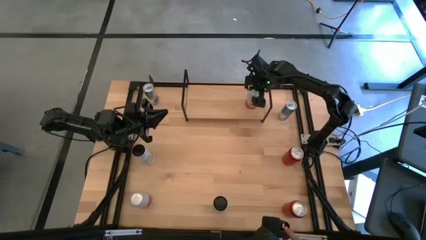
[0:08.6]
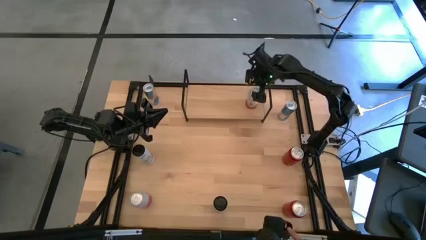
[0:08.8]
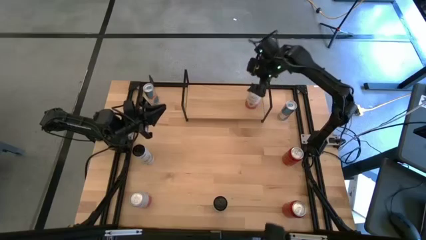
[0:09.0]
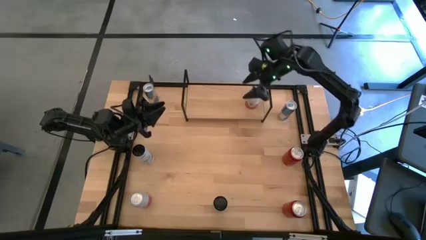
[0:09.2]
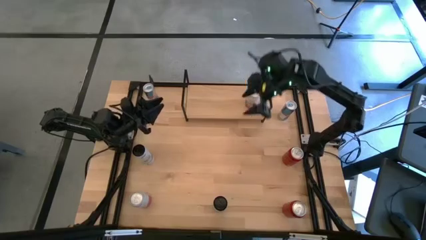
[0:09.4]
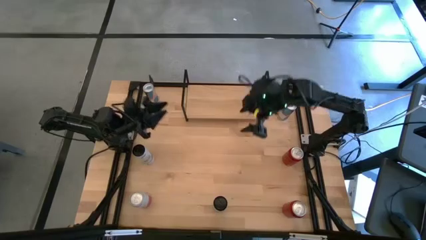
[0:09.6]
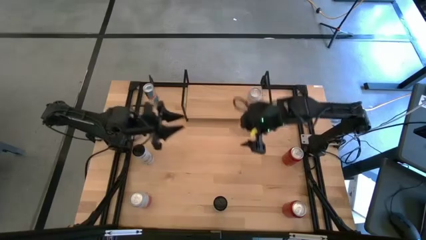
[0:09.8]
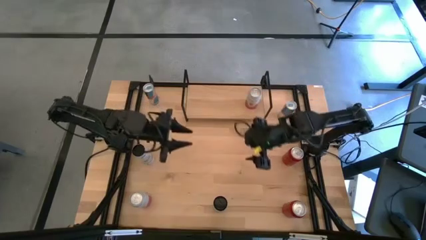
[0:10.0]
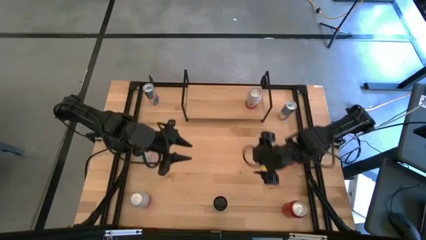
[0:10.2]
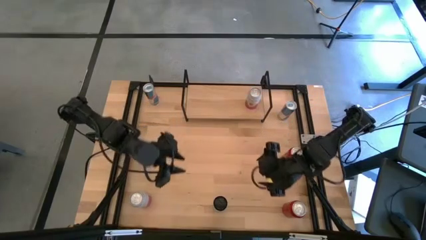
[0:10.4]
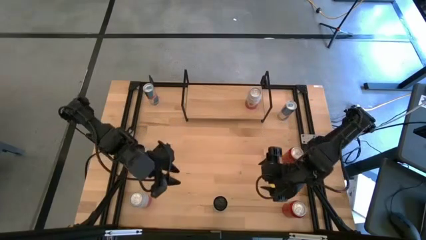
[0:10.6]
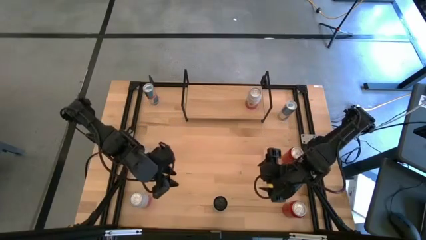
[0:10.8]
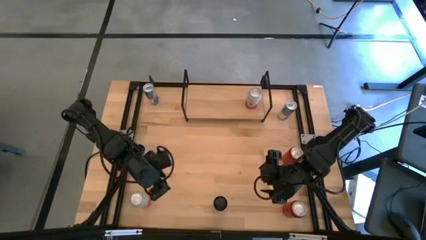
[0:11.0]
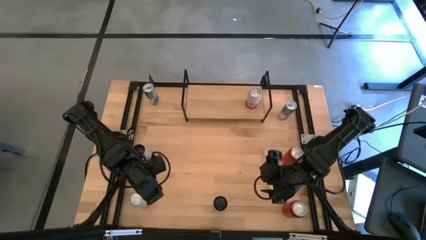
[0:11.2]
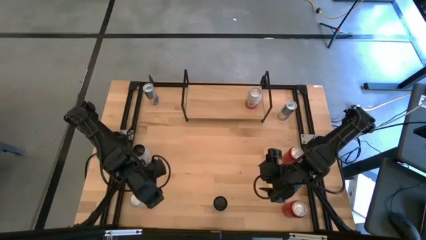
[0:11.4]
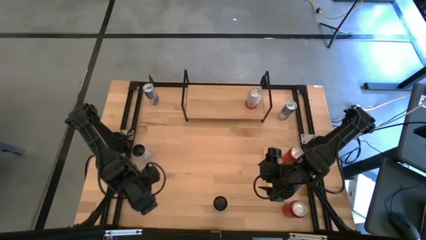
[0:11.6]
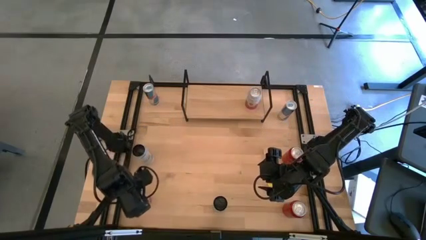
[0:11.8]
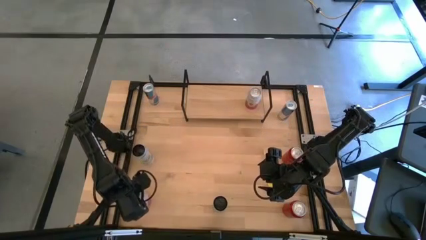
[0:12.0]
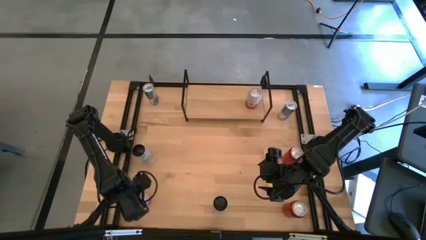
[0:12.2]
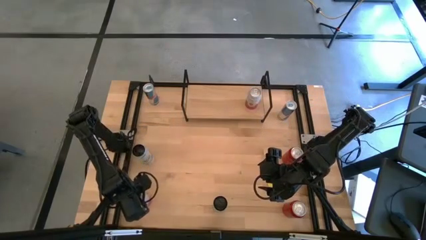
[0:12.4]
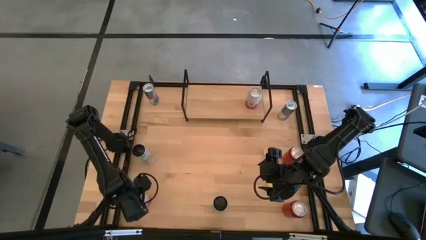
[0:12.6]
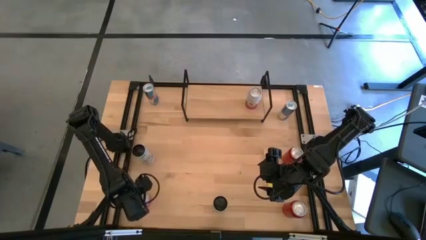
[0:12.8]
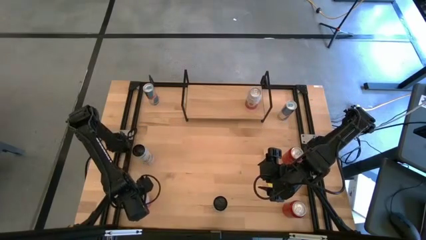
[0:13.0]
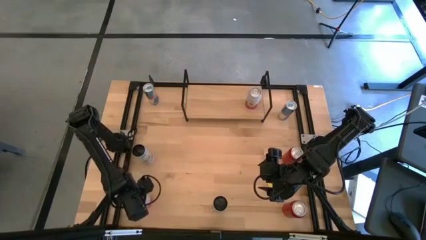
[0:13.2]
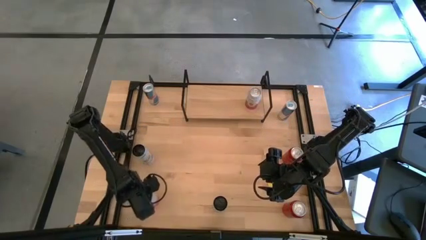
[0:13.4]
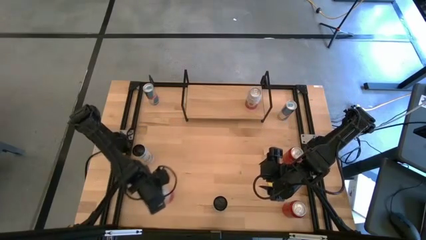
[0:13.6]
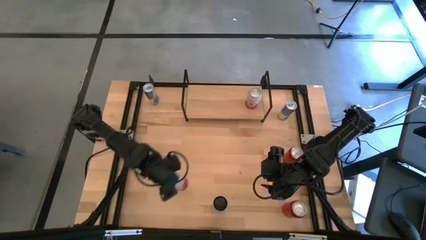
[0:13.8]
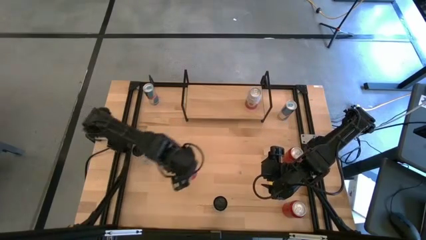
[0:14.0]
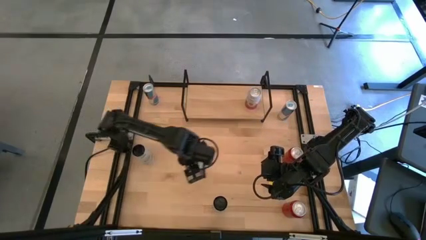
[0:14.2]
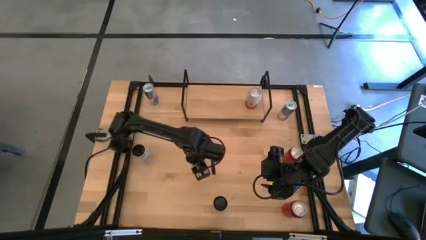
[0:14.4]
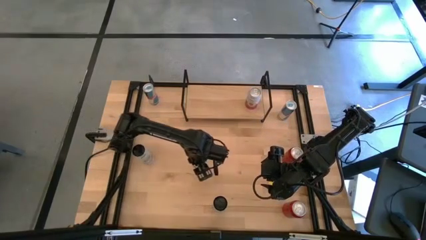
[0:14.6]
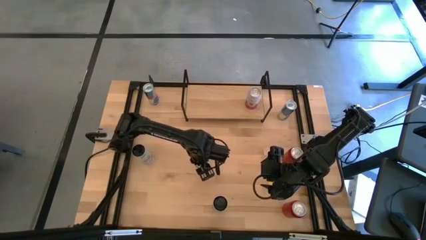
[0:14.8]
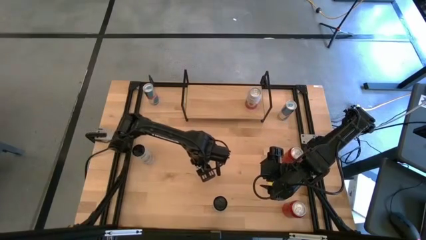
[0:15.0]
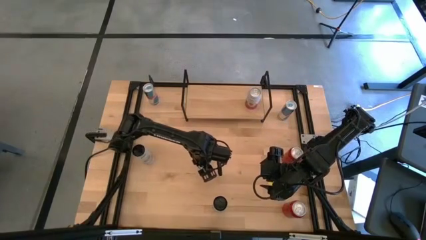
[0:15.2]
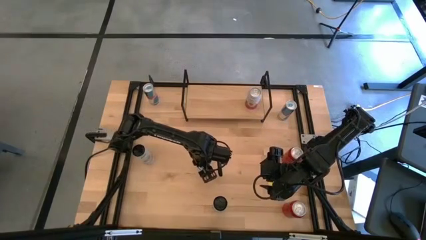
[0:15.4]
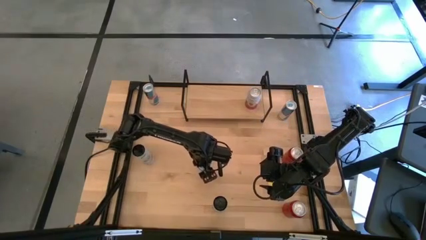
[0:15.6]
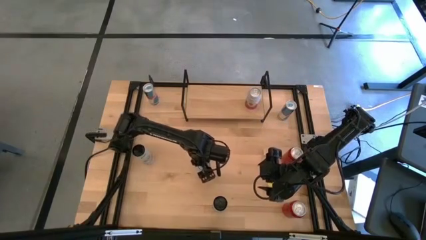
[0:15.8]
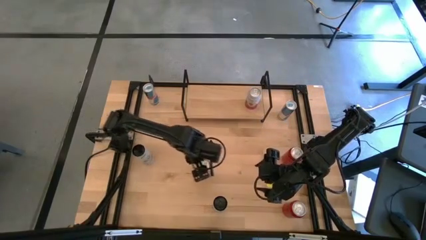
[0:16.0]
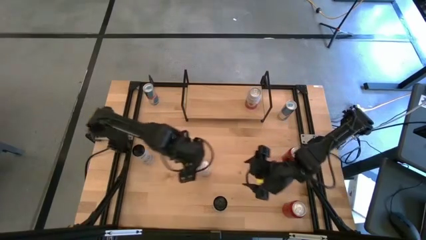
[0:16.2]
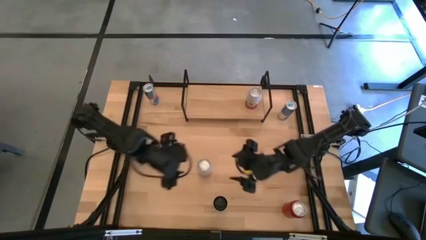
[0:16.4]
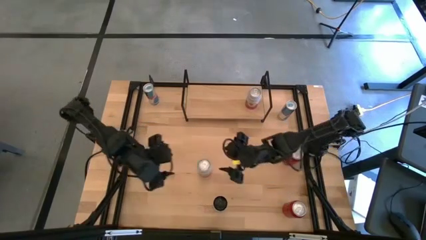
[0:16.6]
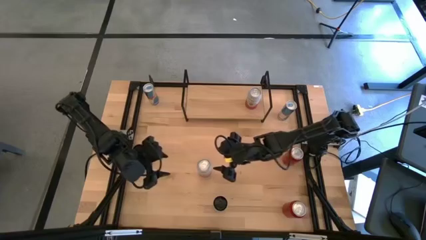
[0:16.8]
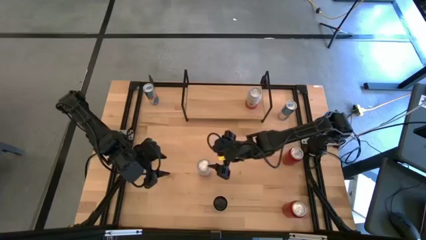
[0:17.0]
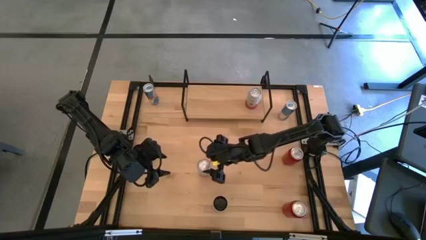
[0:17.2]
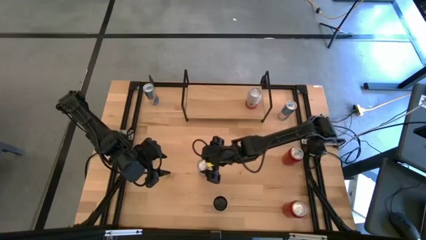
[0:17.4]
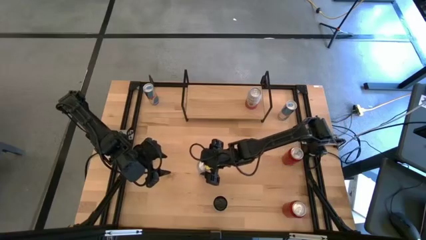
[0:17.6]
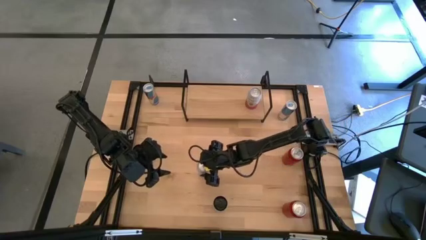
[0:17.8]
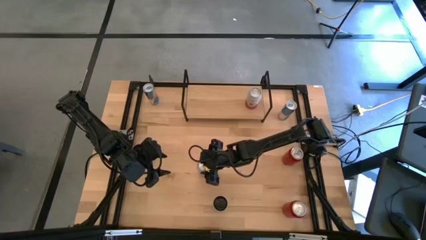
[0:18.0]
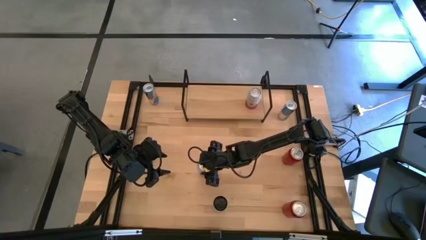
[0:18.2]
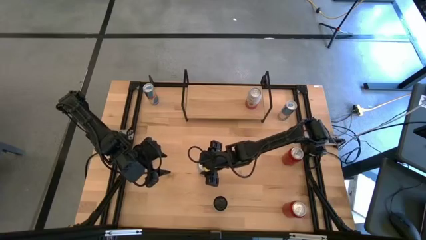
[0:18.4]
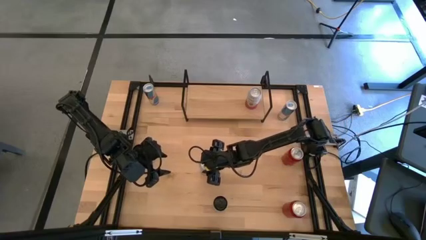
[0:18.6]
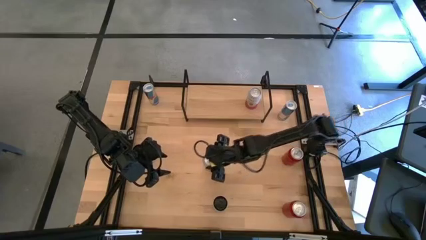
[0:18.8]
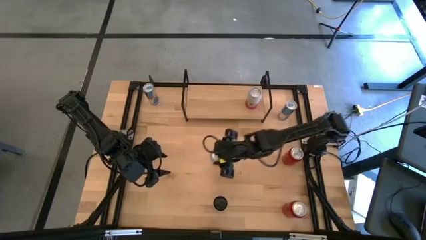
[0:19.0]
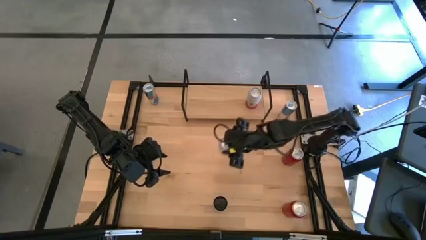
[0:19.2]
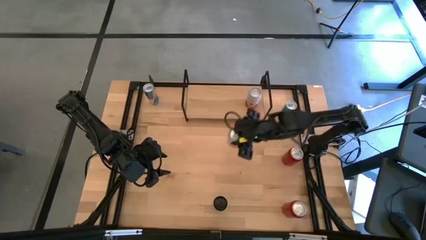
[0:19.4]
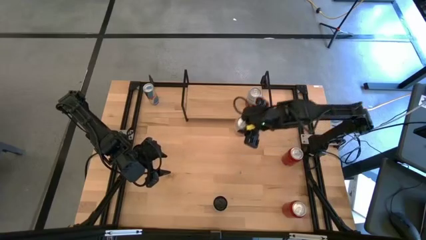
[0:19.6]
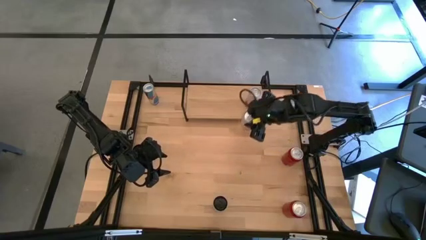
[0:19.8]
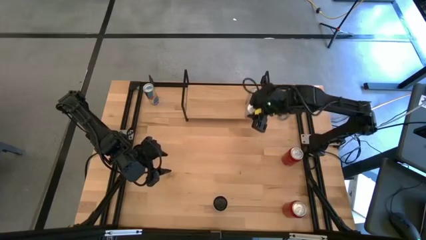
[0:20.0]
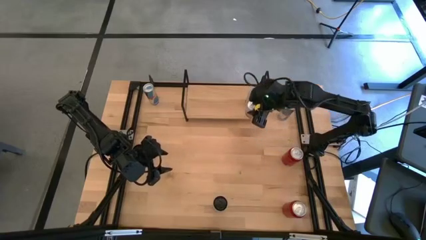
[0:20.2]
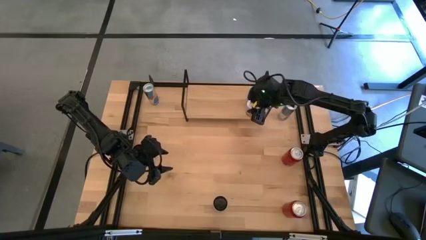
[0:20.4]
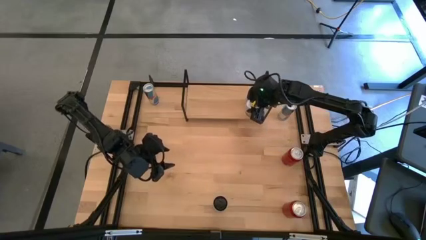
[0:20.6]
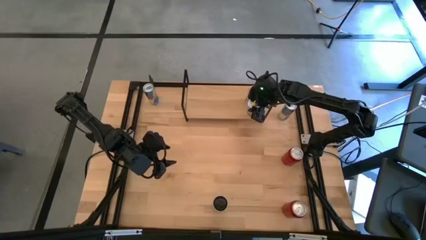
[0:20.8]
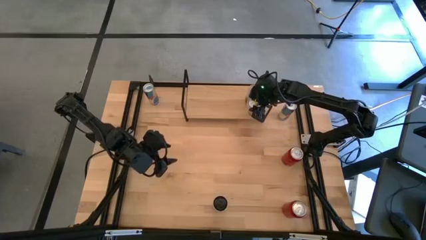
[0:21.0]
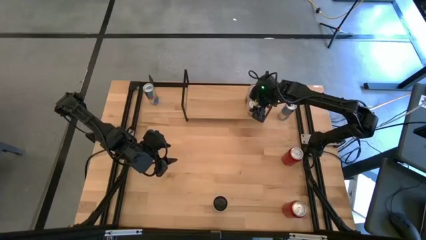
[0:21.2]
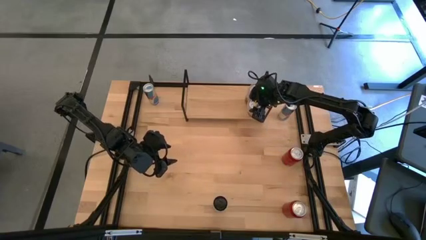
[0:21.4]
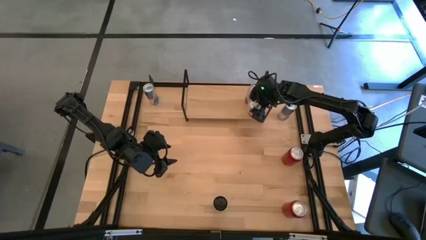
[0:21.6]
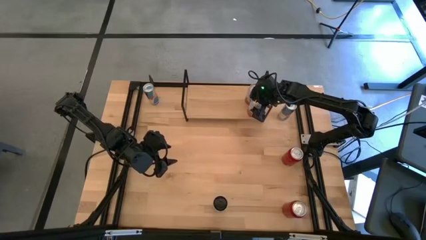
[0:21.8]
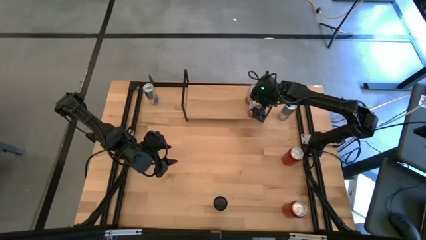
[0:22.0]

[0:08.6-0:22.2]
Task: Place canned beverage on shelf
Put the pink soda can on the shelf

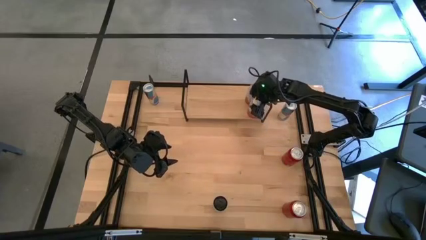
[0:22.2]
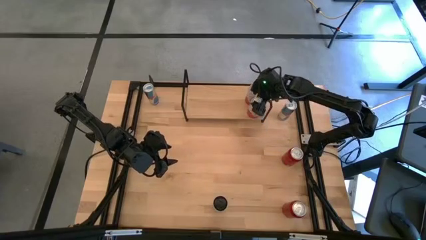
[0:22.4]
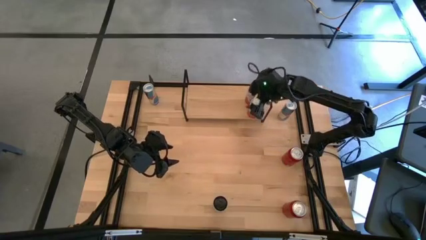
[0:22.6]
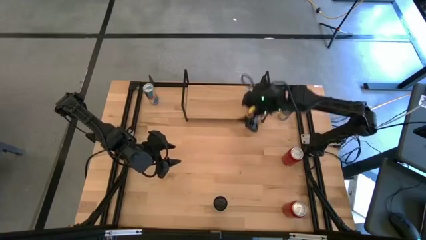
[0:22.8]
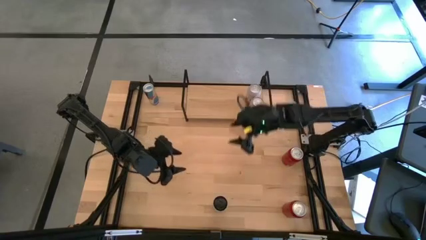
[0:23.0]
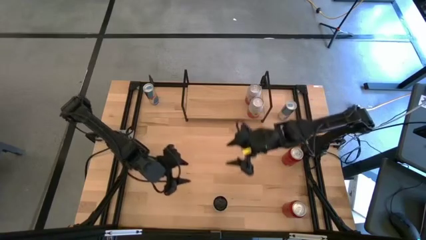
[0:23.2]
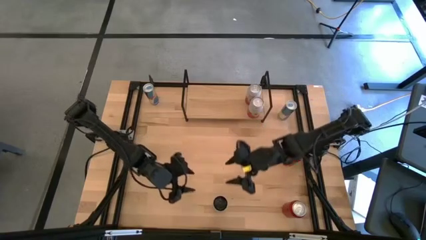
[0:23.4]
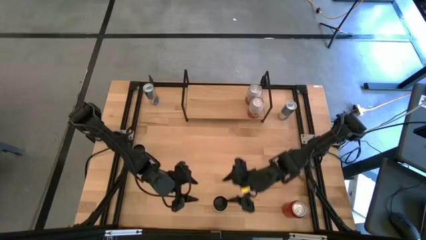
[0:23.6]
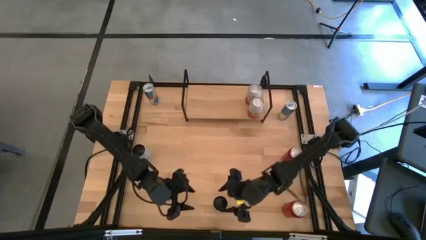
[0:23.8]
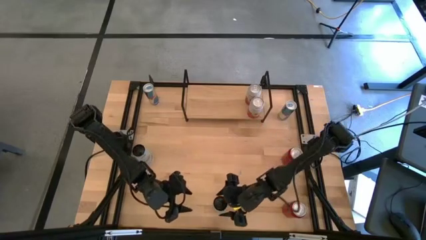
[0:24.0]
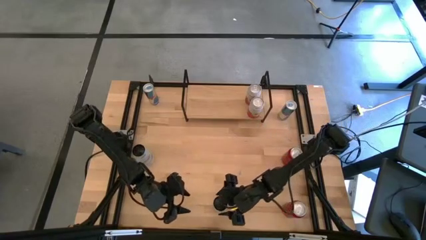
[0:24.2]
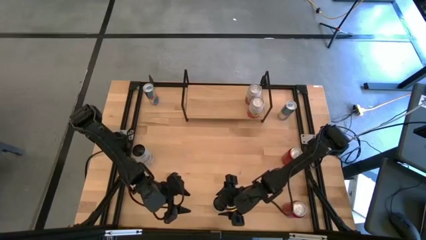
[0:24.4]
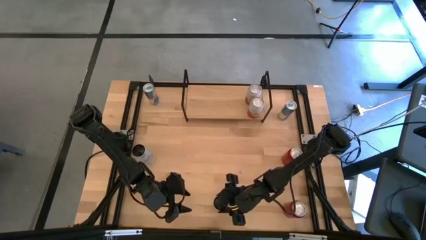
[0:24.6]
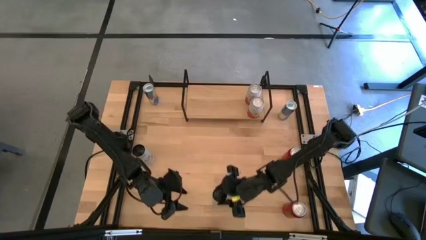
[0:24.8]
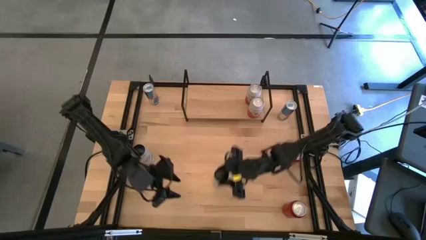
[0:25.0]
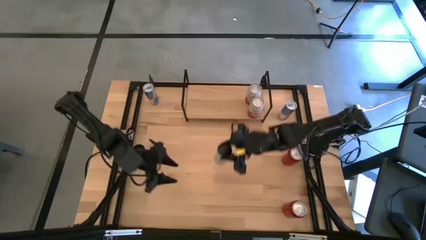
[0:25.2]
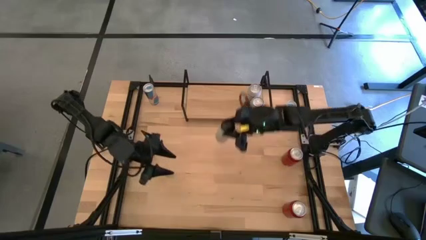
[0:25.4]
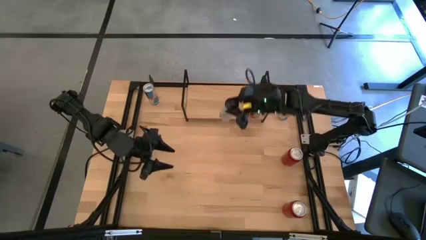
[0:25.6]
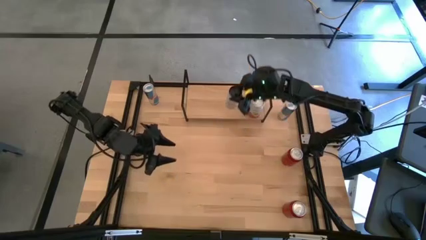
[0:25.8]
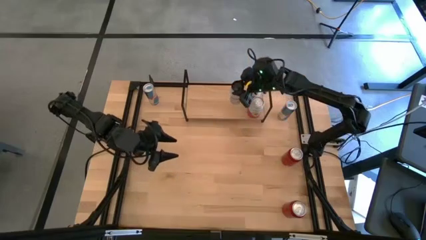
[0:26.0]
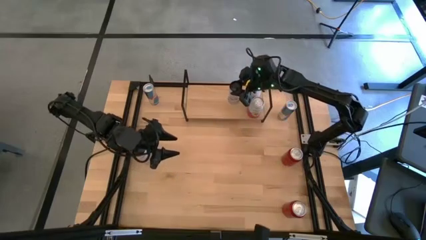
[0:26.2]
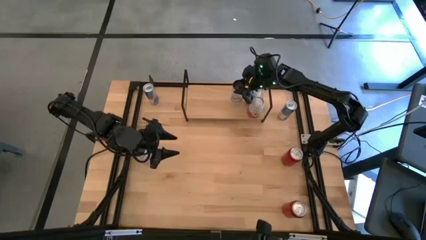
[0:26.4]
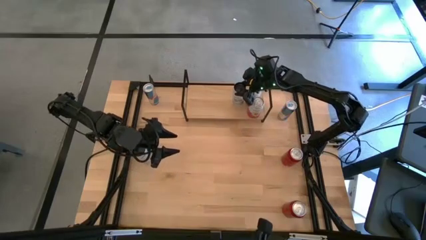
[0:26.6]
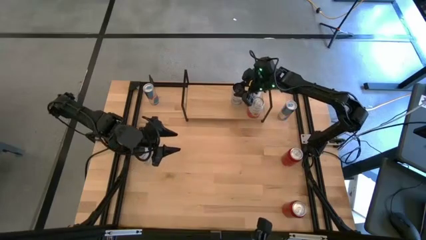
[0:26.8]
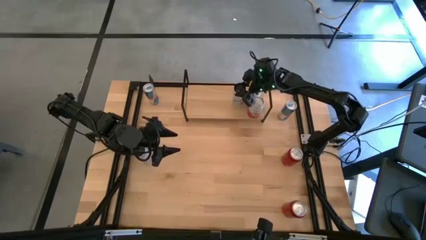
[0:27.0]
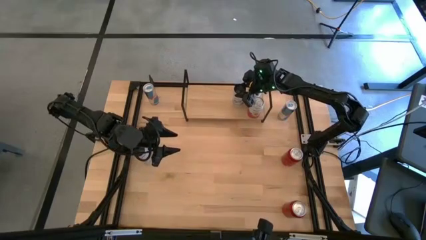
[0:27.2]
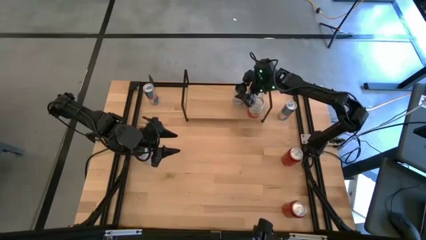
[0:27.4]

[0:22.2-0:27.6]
Put the bottom white soda can on the shelf
